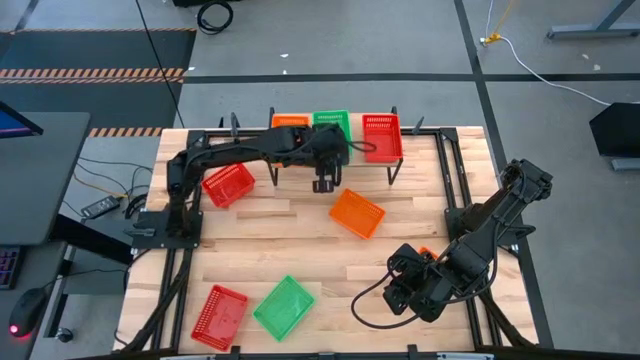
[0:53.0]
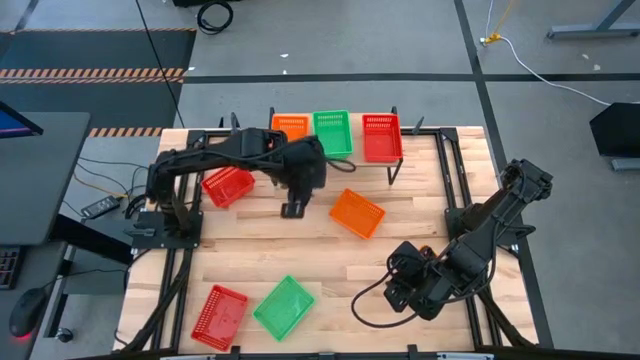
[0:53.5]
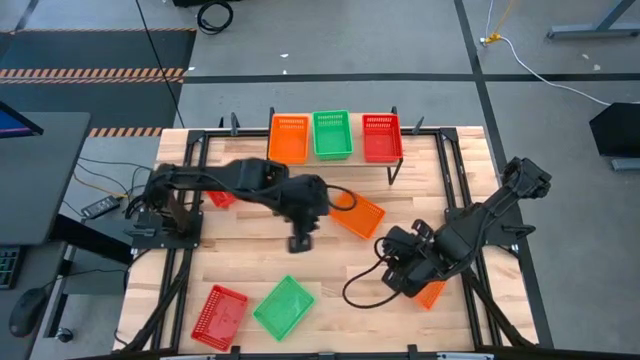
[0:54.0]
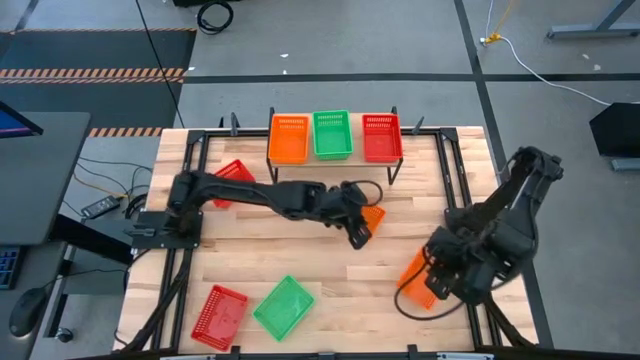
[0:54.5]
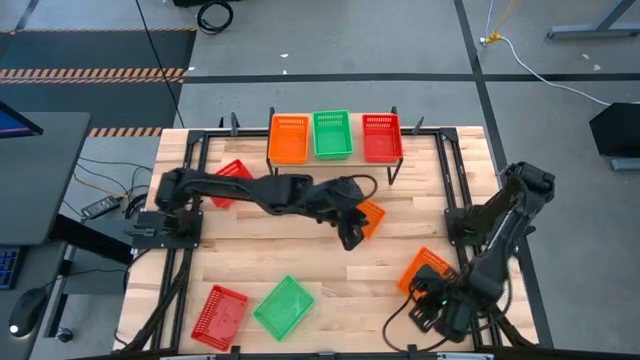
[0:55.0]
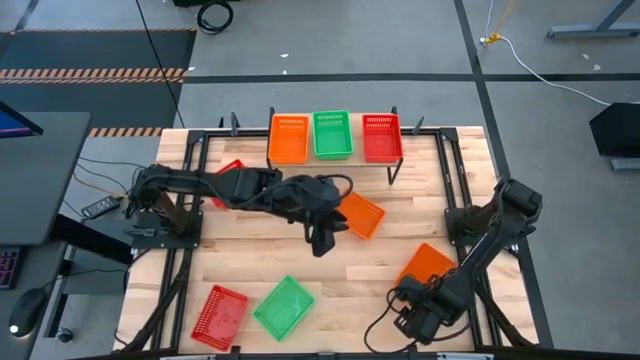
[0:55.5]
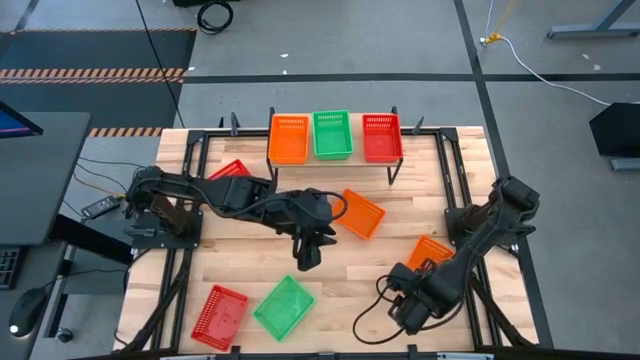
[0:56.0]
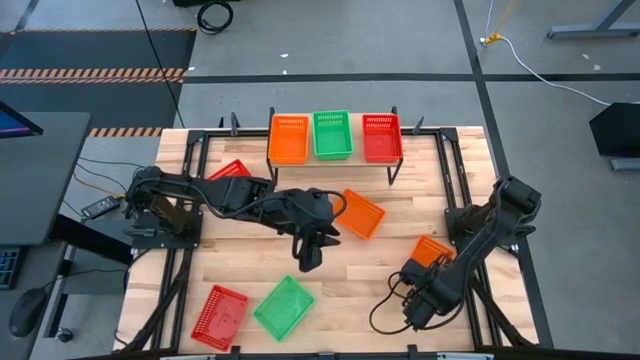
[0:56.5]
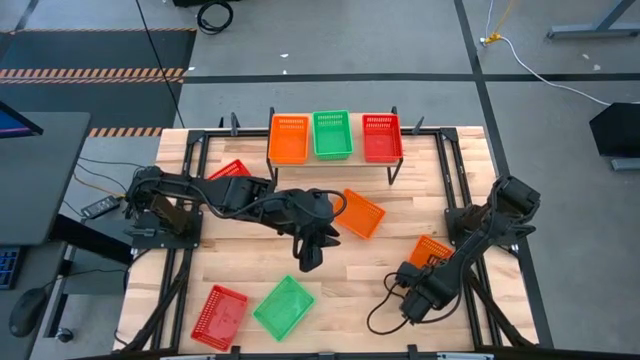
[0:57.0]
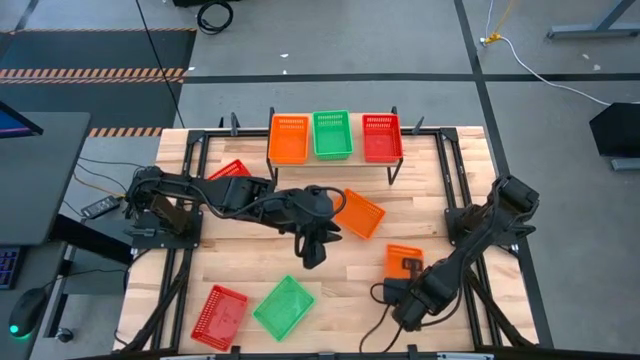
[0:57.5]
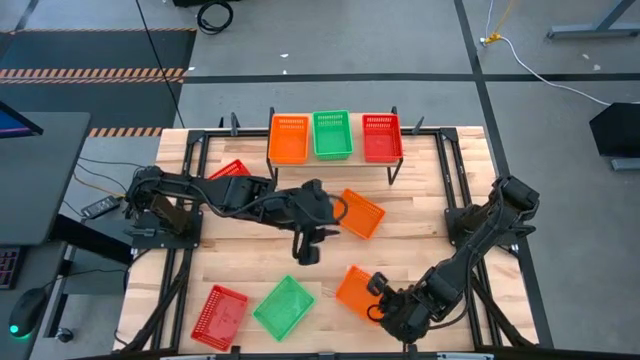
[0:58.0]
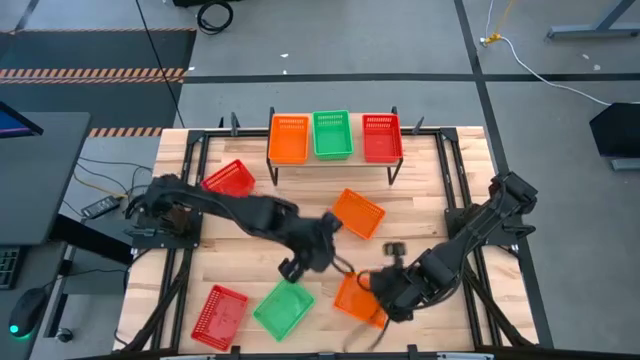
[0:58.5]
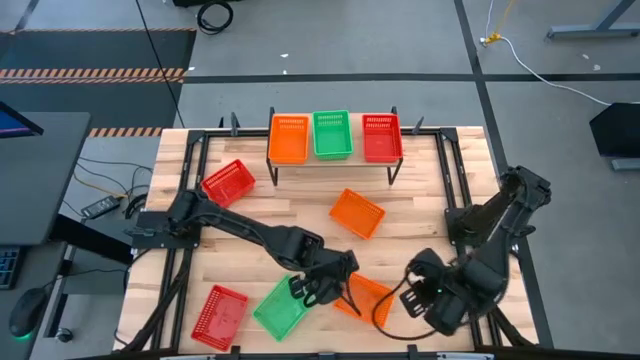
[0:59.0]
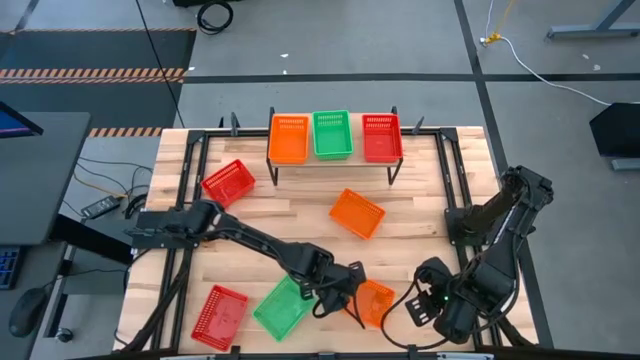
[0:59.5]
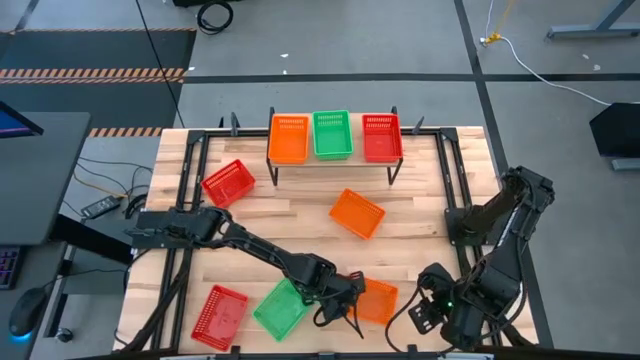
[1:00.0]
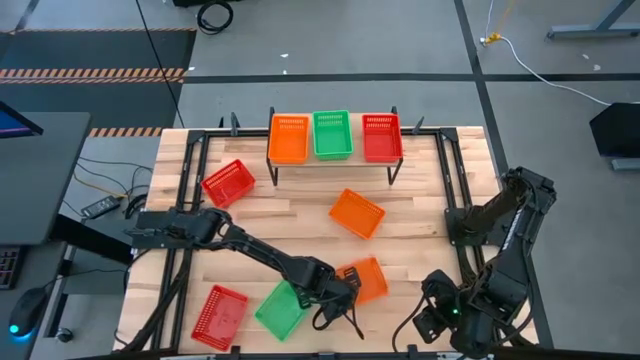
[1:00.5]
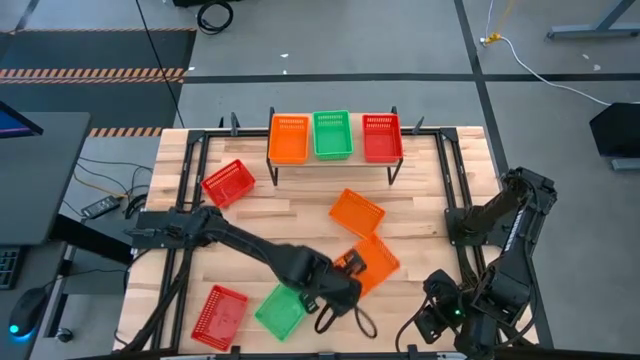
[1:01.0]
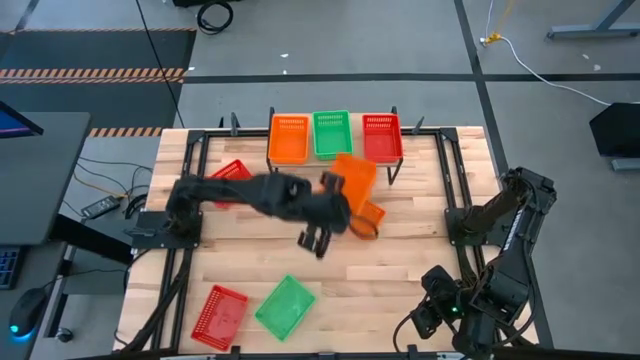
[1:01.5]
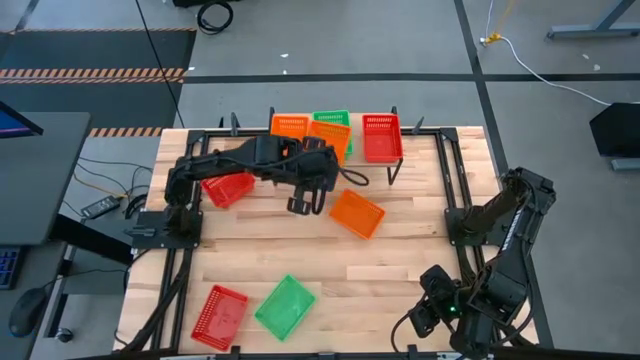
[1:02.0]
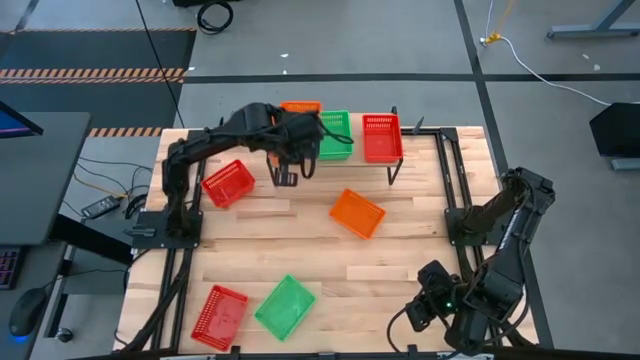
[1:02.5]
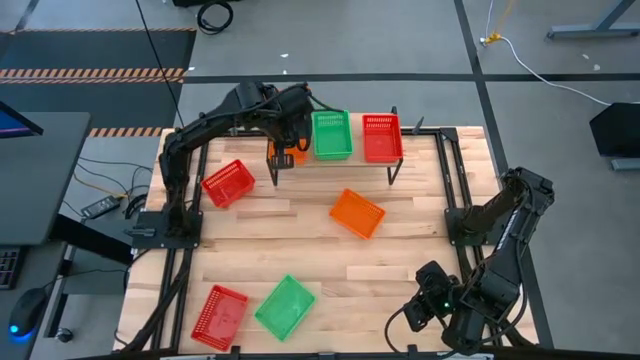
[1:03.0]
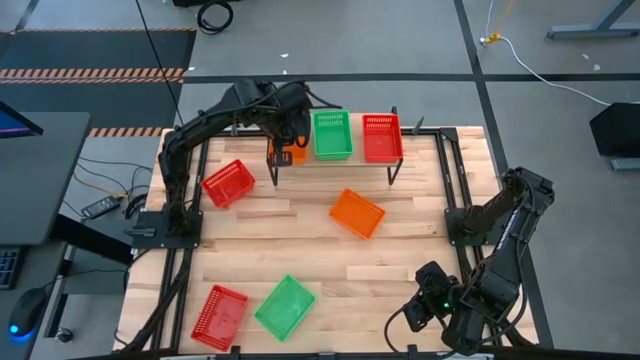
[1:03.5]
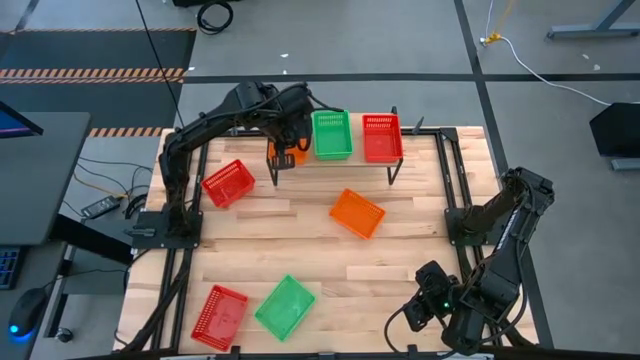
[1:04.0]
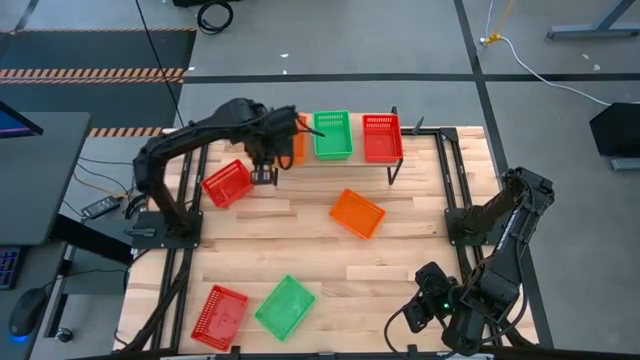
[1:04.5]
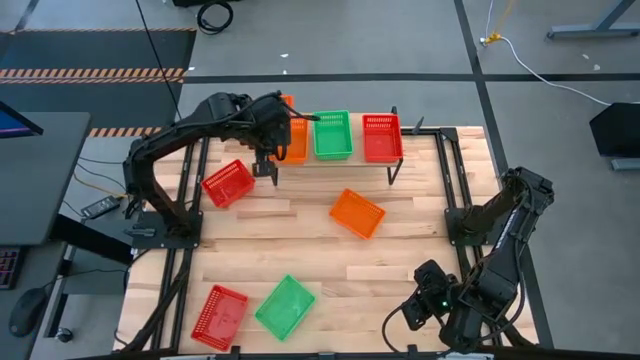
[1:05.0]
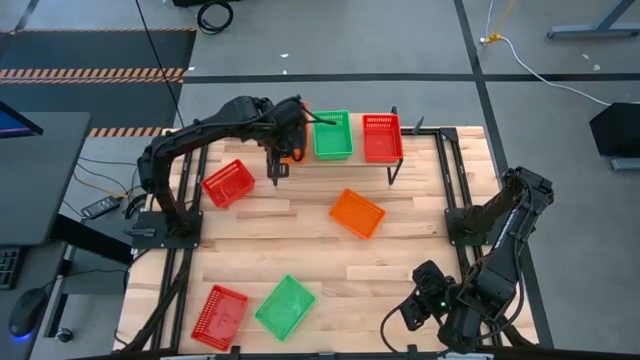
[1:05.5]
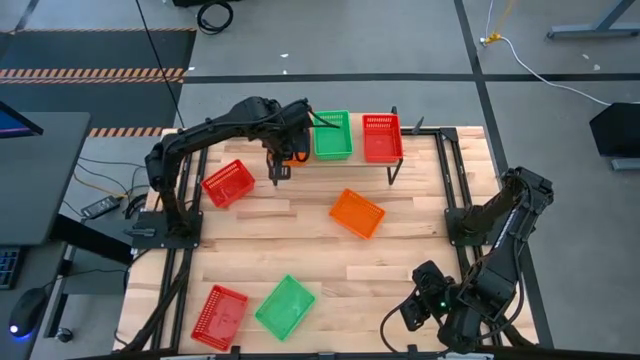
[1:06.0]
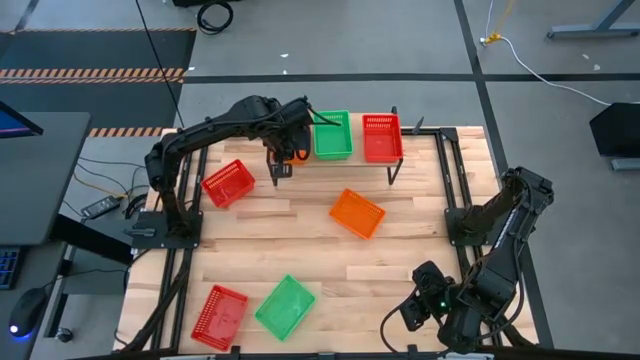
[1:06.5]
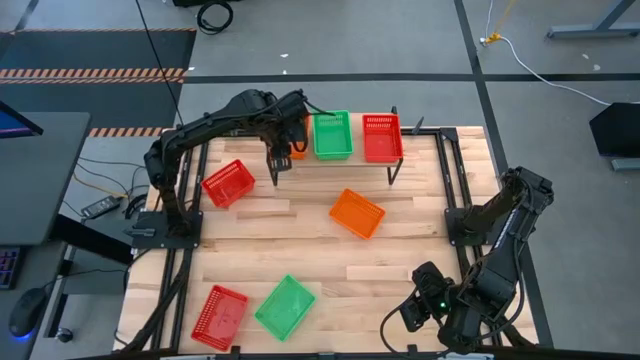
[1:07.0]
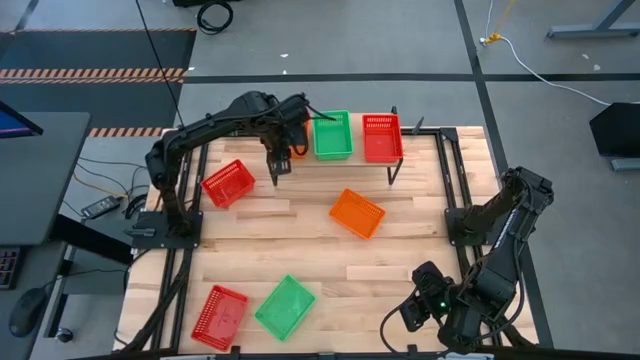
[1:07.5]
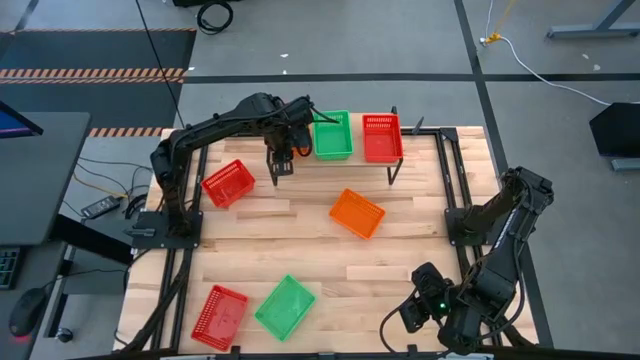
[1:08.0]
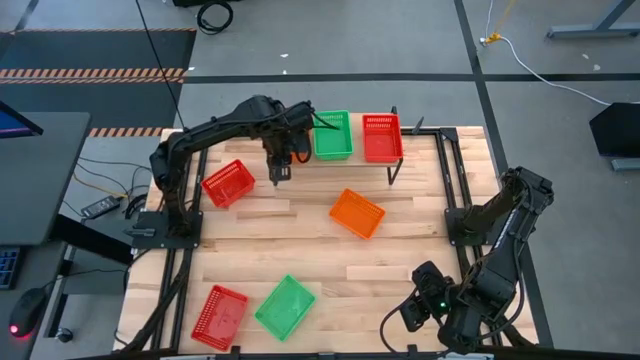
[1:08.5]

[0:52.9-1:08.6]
Task: Stack baskets on shelf by color
Stack the bottom orange bin on the orange bin on the shelf

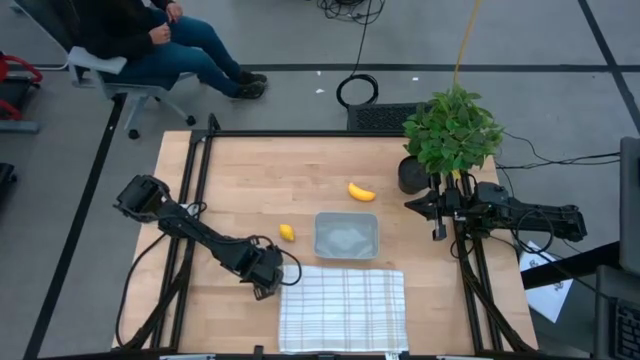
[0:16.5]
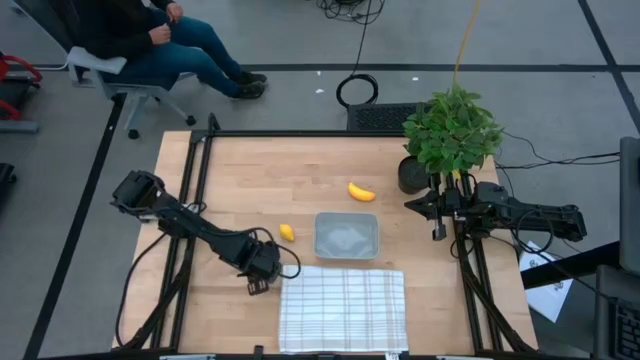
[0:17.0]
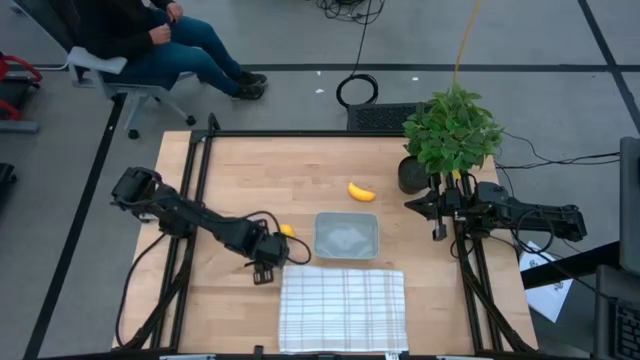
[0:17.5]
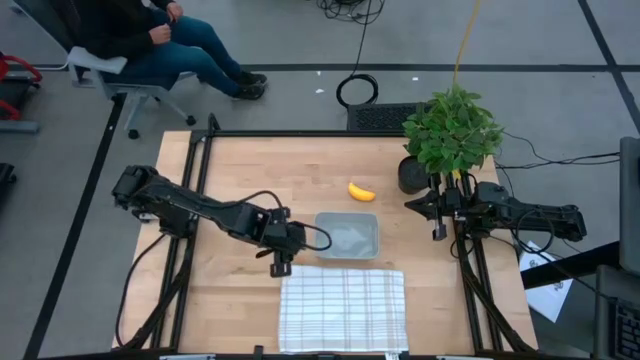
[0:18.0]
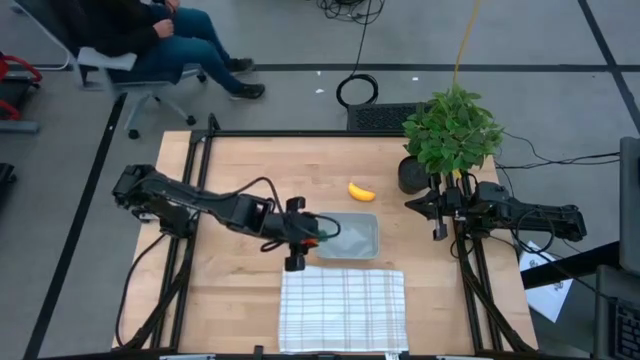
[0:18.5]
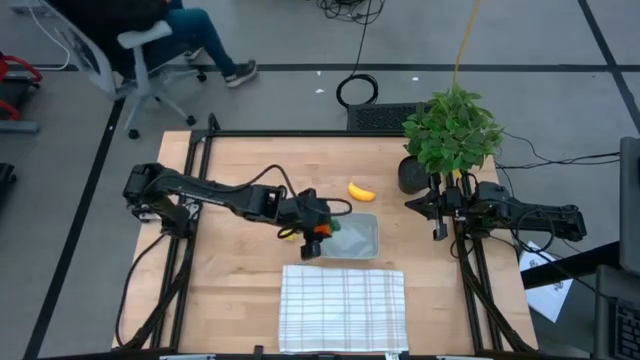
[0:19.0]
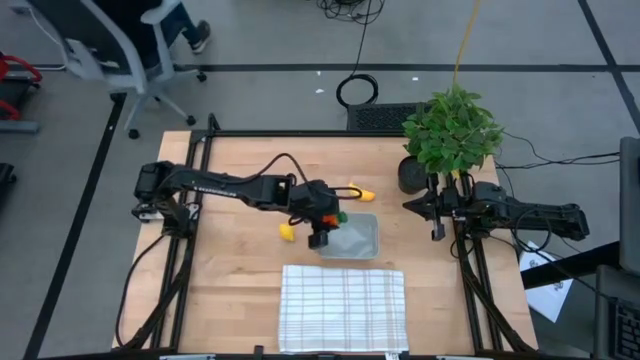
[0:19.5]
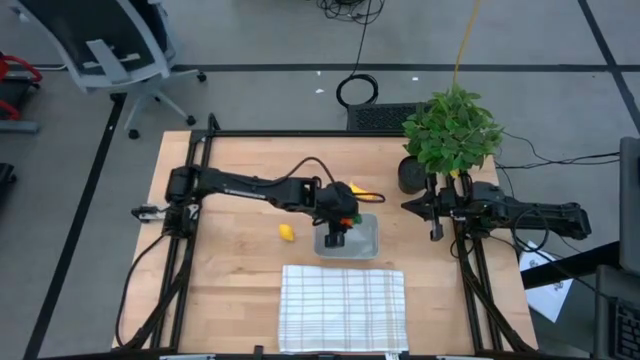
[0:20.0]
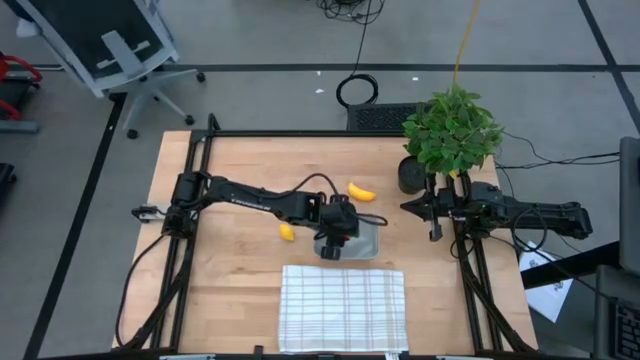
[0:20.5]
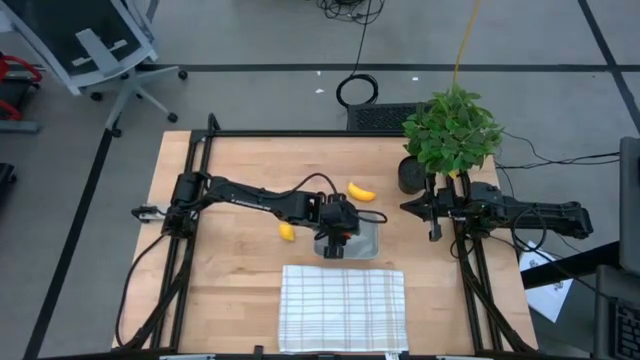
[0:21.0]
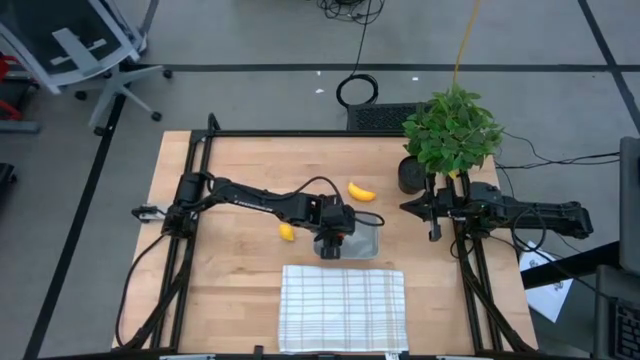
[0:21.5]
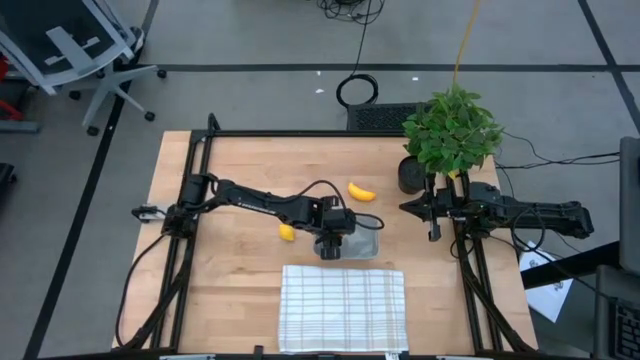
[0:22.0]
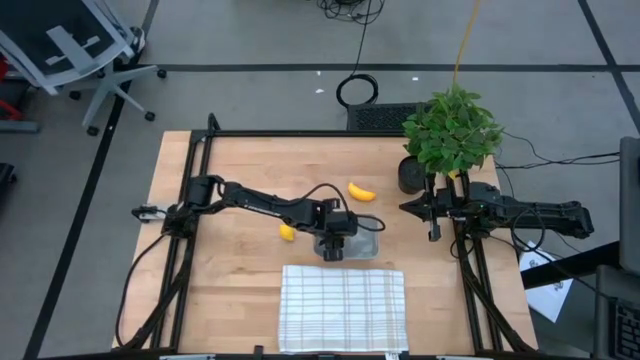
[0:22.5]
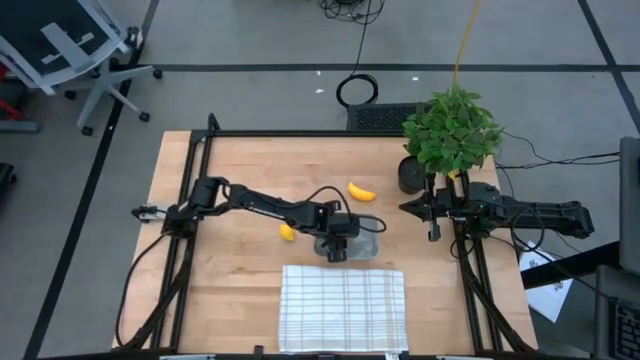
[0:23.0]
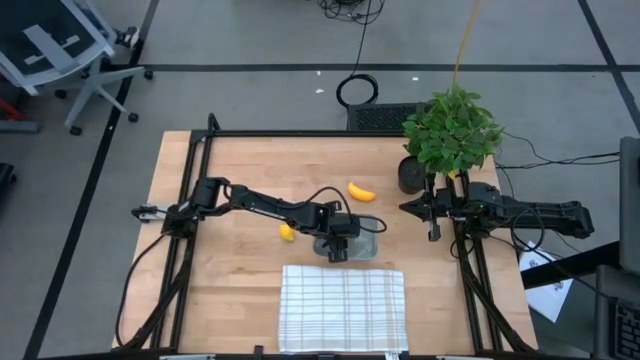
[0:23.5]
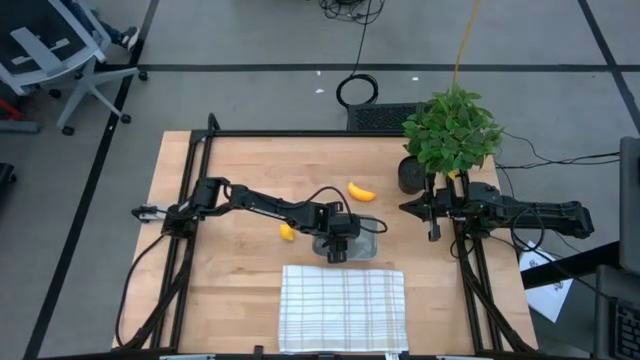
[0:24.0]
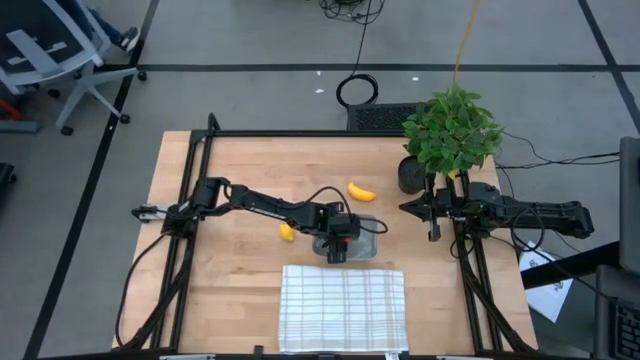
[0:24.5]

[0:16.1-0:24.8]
Task: Pick and placing Produce into tupperware
Put the carrot into the gray bin
